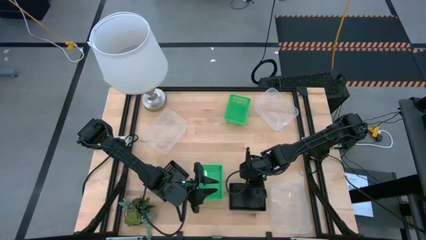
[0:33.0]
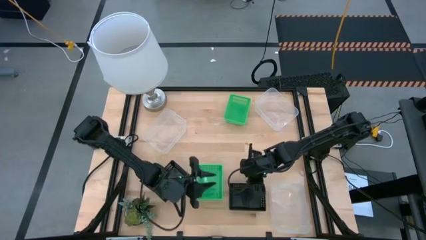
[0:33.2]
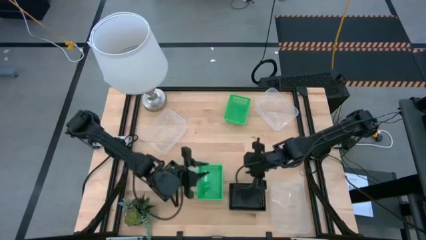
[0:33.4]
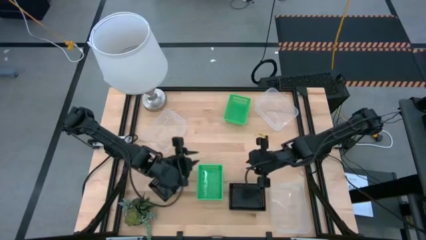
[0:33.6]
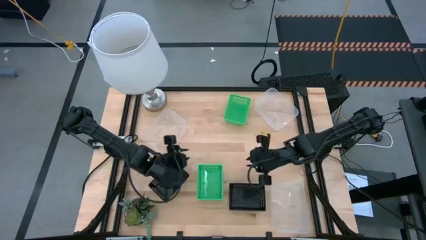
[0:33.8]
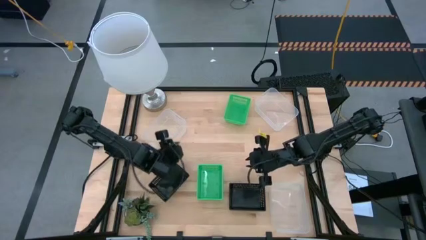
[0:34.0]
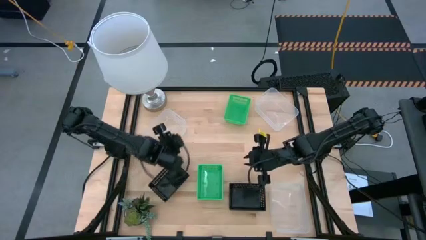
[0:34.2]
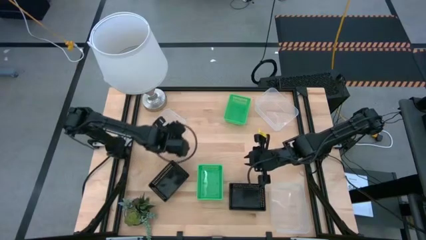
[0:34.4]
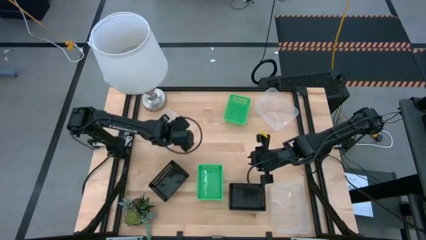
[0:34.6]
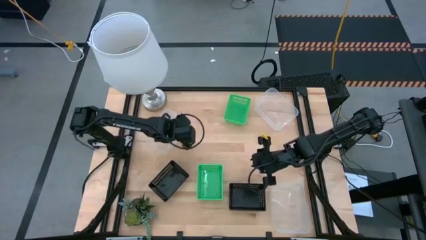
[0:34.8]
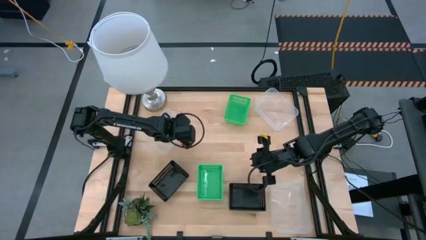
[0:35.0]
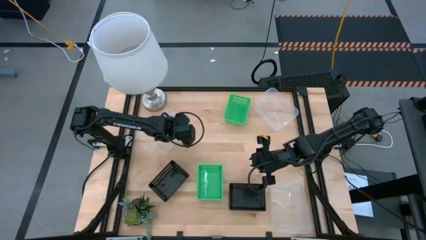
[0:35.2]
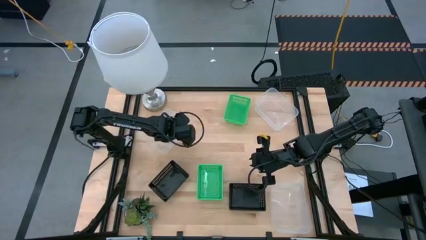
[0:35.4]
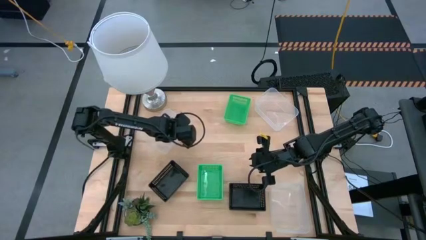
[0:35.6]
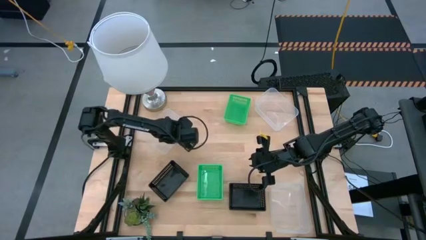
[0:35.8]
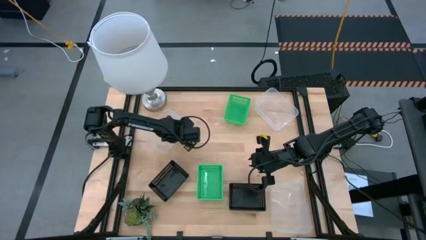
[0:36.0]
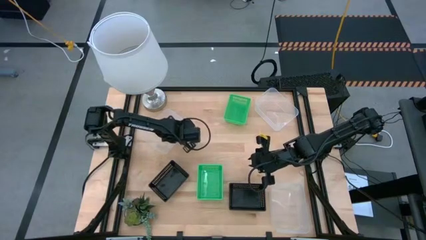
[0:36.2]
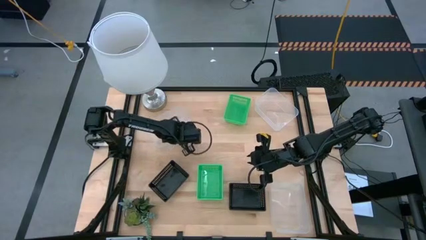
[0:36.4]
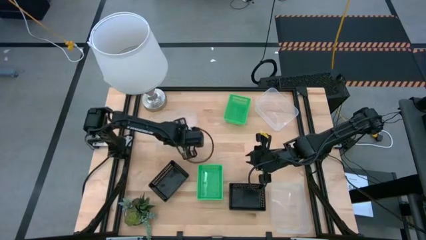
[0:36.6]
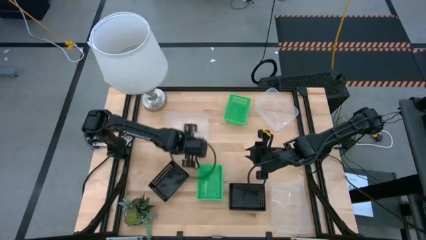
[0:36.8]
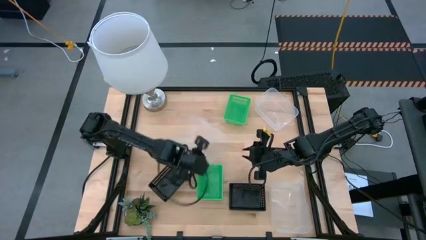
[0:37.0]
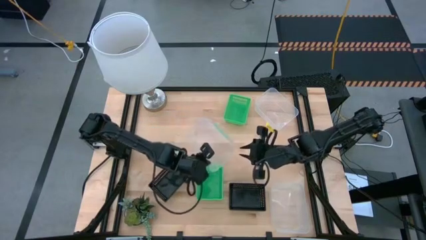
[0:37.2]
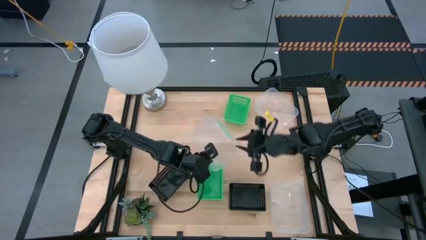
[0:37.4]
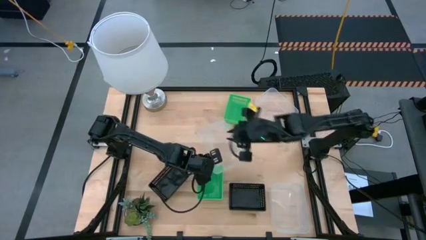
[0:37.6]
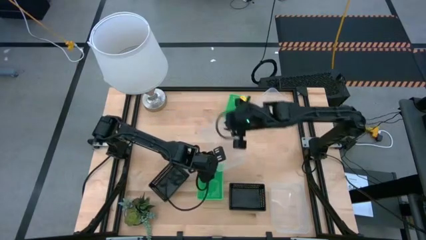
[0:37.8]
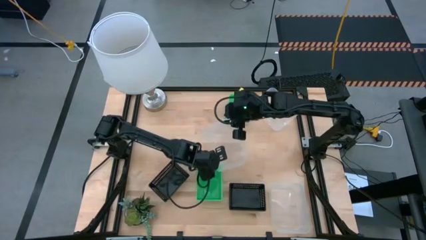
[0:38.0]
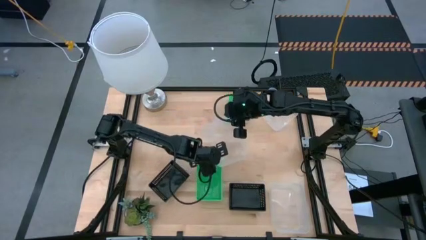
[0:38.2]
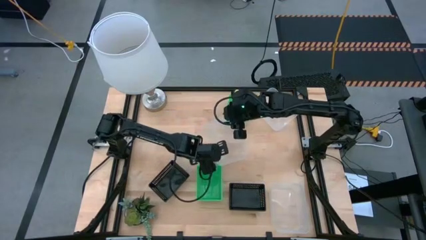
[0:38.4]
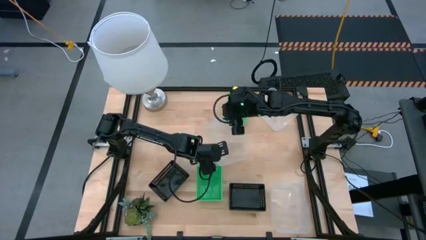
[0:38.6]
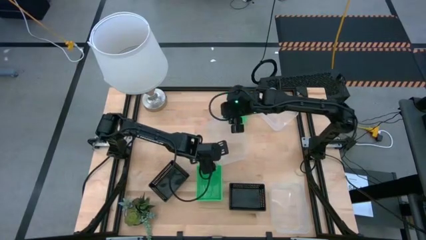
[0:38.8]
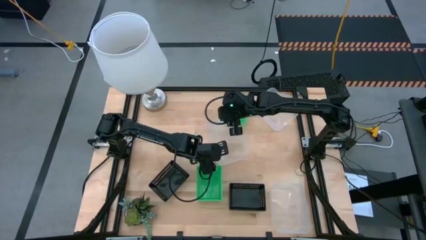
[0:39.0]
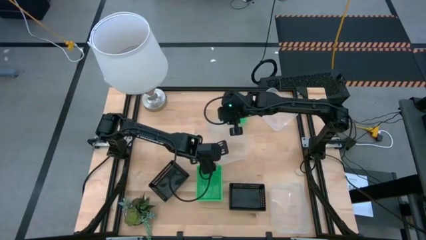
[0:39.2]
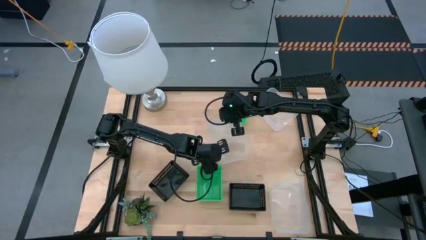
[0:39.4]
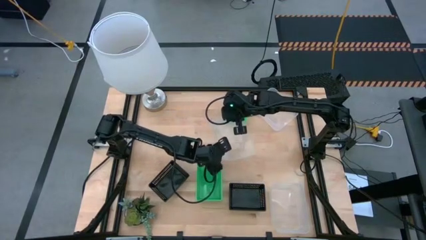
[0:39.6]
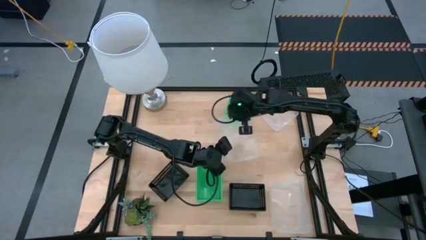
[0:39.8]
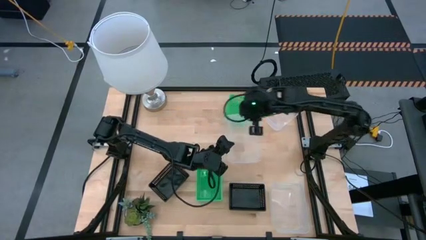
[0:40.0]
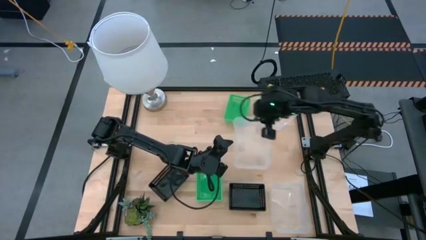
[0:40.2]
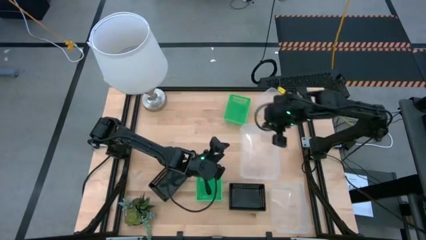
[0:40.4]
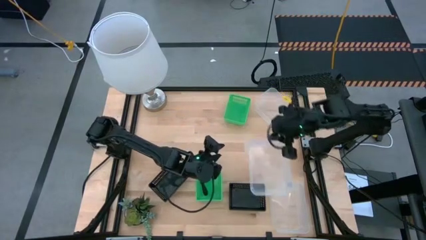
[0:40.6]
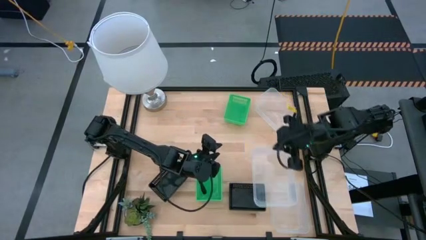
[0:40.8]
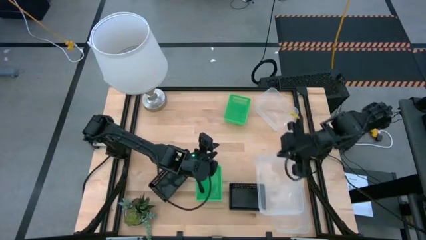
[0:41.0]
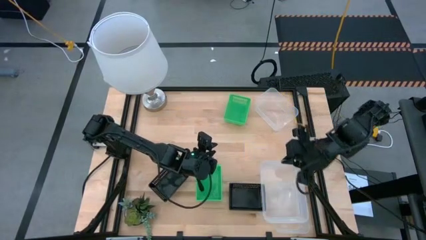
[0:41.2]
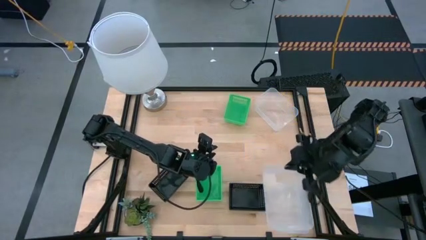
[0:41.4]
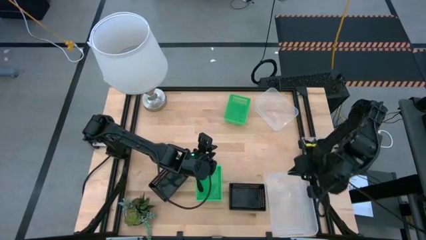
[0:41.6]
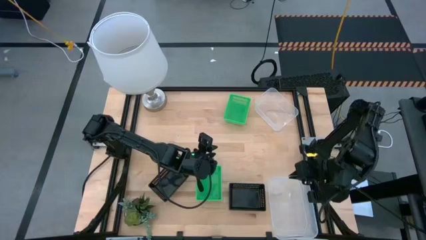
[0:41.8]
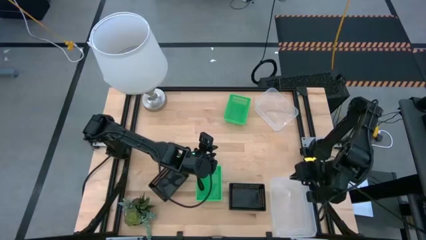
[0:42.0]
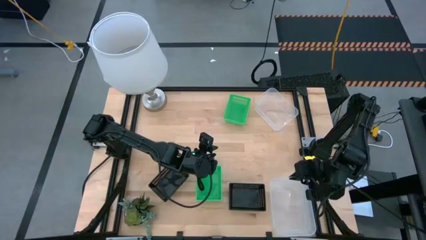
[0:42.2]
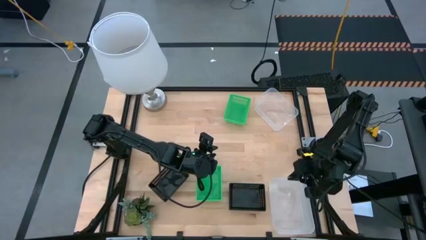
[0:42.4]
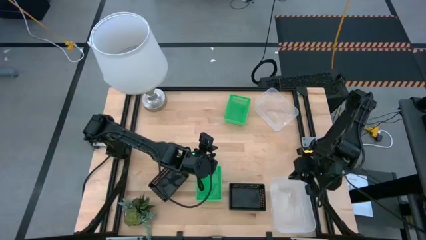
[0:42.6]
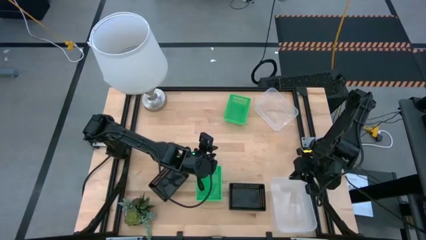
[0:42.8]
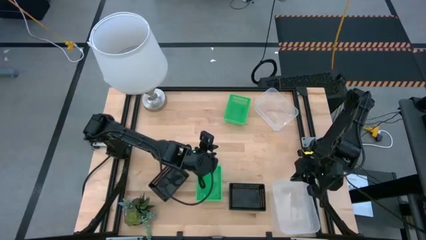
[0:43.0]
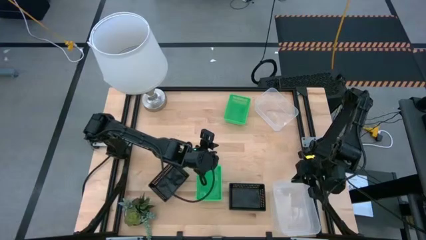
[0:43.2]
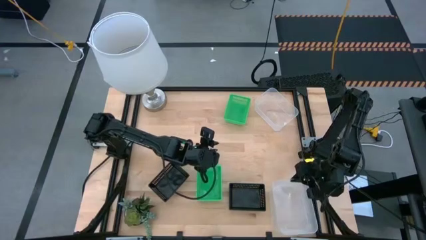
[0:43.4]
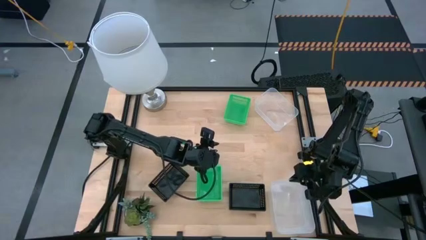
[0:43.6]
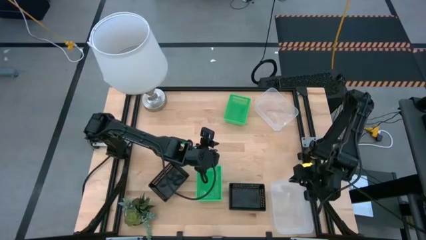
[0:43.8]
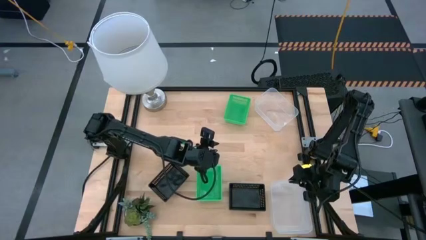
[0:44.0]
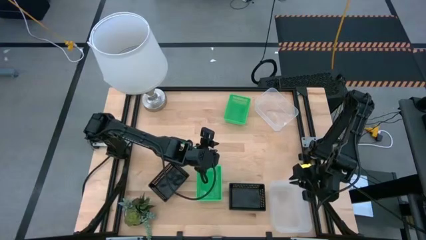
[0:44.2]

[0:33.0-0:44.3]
Stack the top left transparent bin on top of the bottom transparent bin

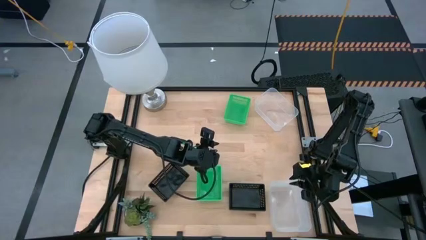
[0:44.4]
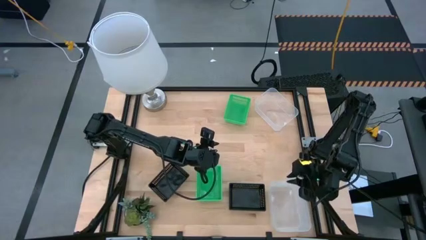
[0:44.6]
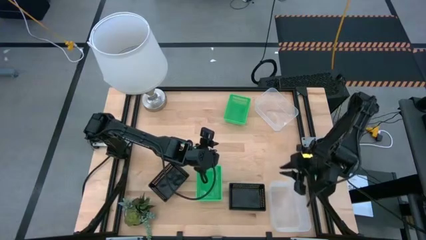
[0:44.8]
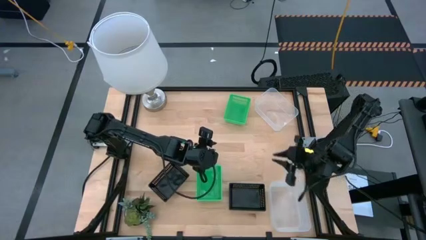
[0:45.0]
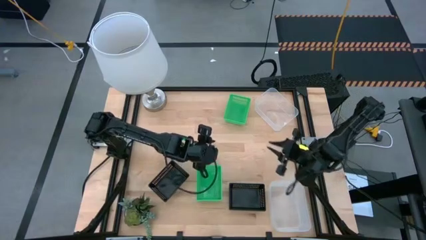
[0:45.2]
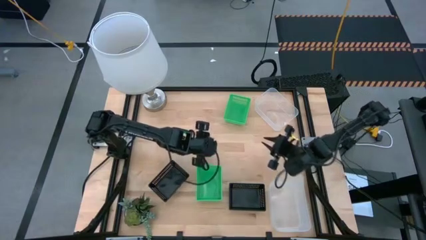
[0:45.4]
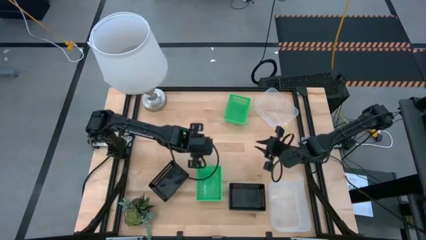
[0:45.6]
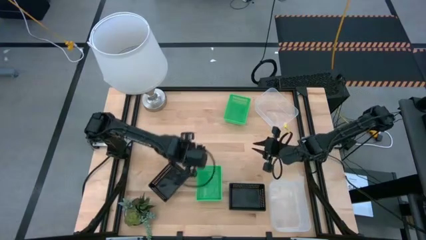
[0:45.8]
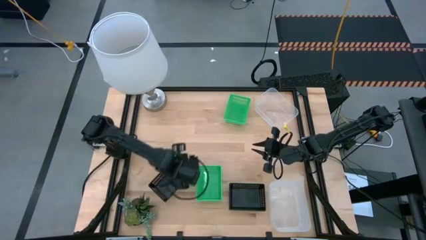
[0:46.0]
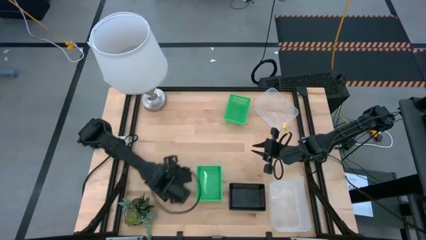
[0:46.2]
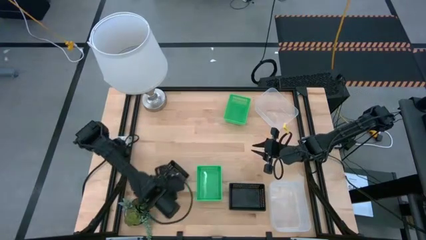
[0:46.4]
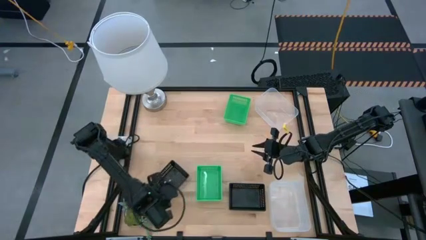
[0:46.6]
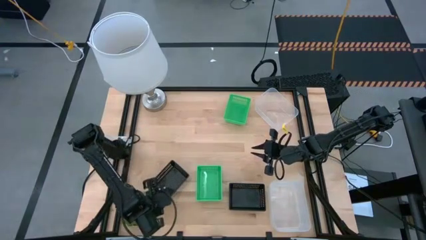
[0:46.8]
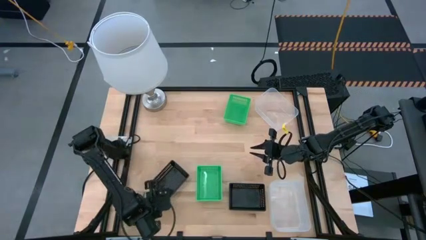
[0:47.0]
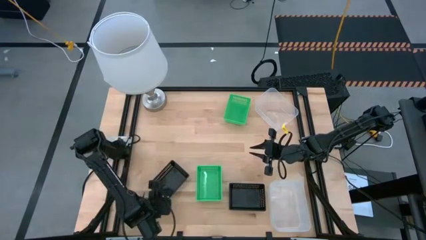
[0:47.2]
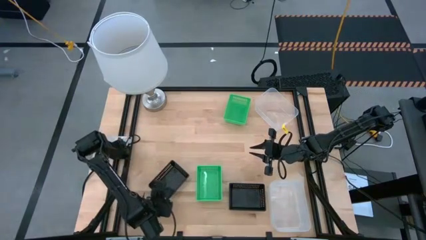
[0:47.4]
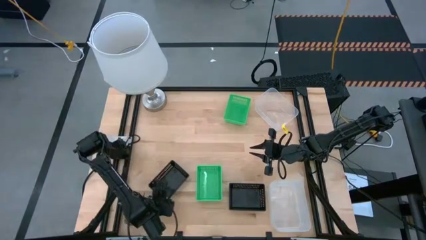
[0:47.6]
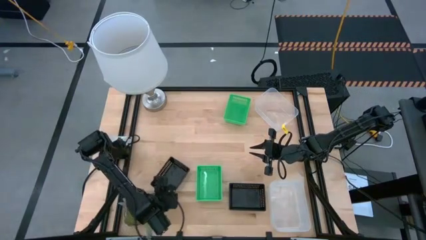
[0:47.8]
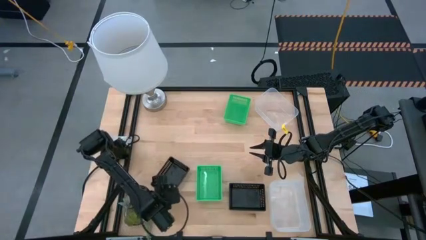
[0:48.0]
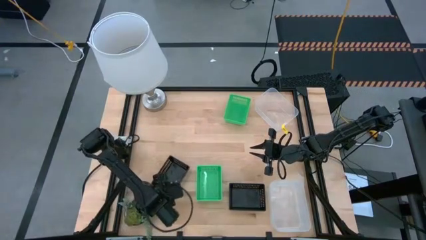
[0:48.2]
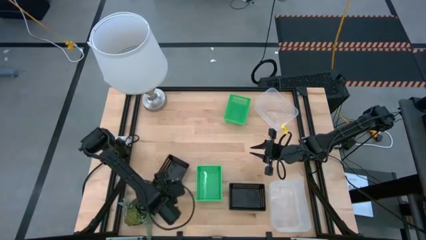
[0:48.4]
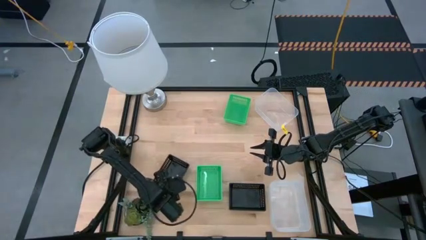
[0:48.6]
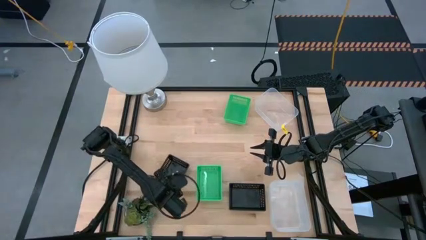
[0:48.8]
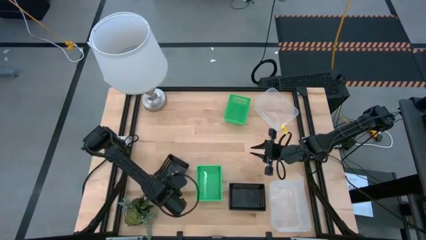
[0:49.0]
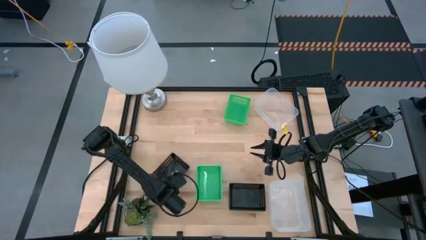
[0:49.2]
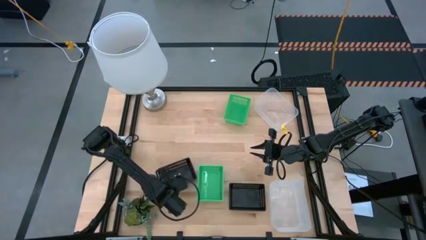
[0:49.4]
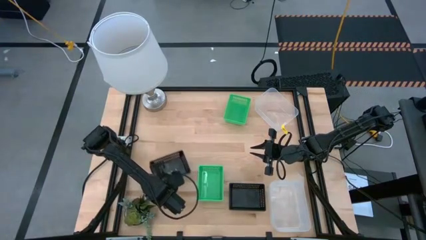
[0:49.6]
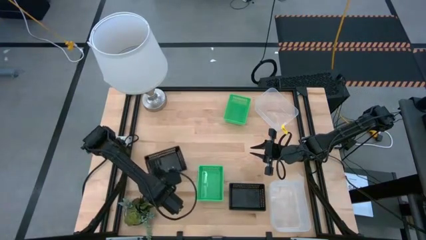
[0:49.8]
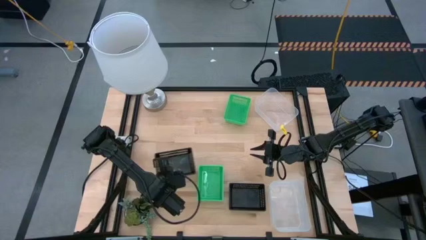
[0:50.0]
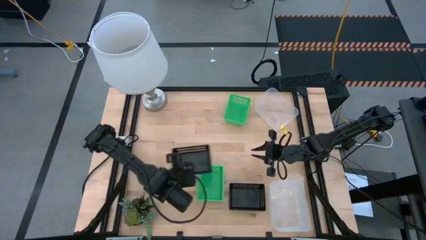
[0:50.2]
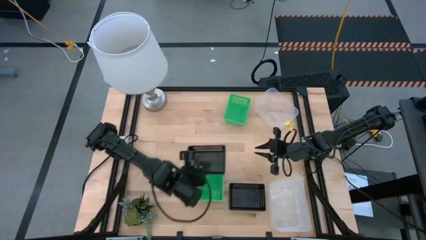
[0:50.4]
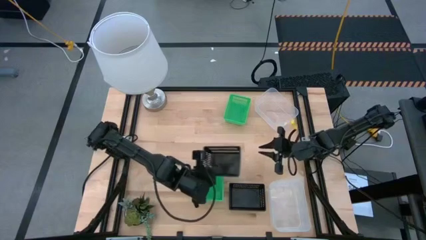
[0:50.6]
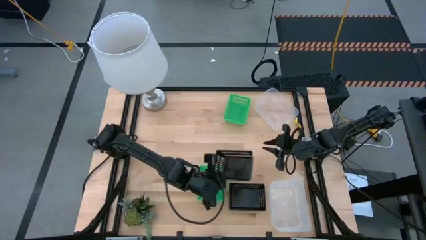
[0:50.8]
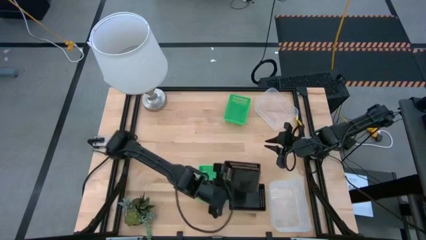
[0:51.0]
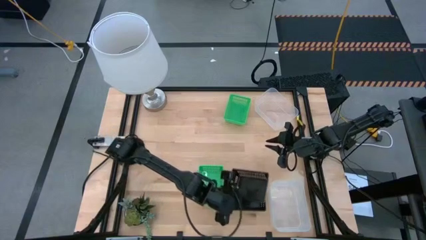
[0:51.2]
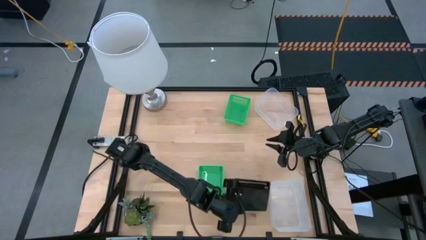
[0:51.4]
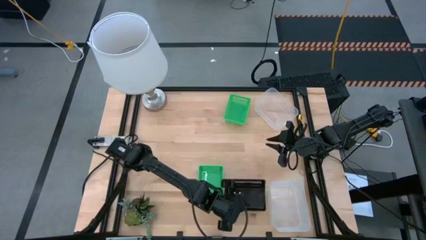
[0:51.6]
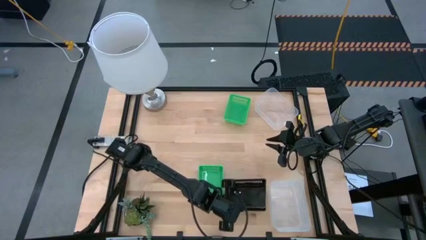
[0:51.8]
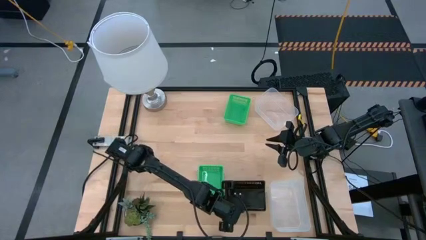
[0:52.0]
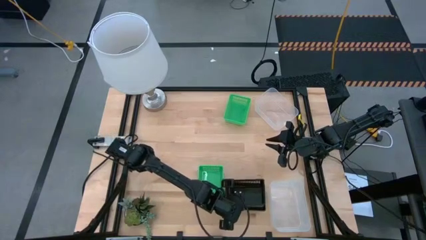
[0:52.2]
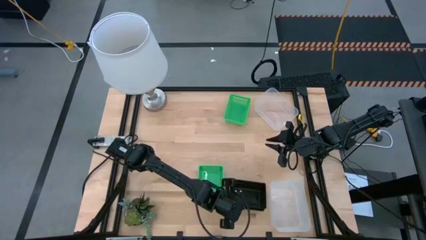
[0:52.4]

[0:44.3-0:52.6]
Stack the left black bin on top of the right stacked black bins
